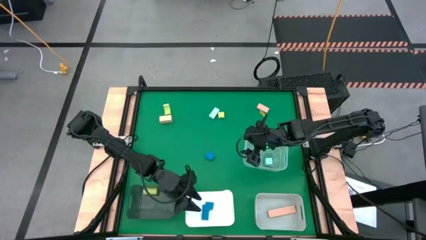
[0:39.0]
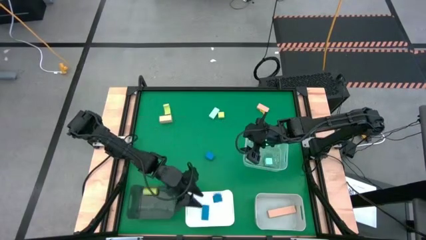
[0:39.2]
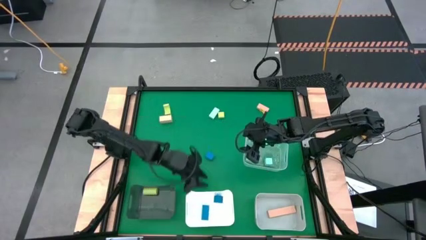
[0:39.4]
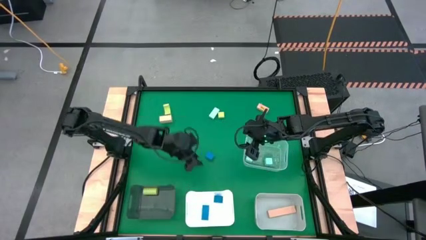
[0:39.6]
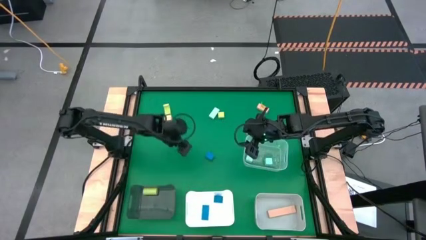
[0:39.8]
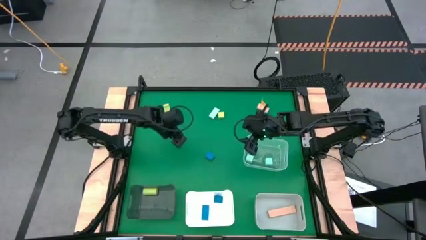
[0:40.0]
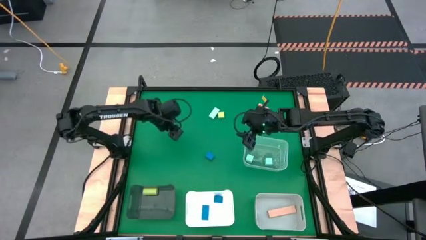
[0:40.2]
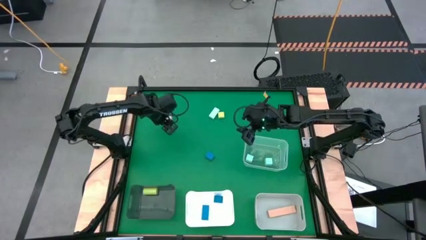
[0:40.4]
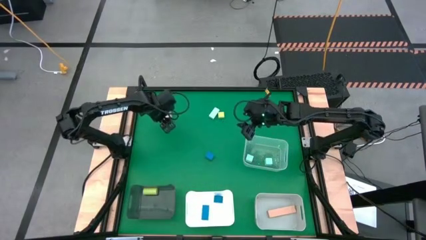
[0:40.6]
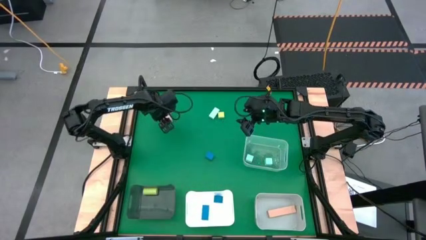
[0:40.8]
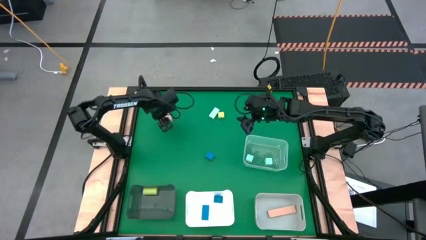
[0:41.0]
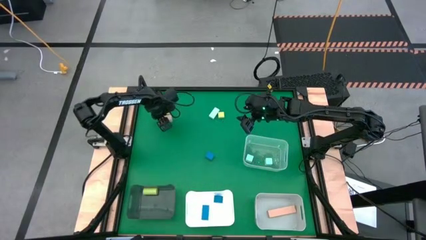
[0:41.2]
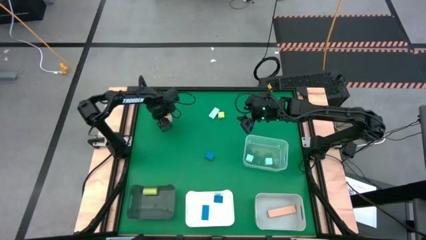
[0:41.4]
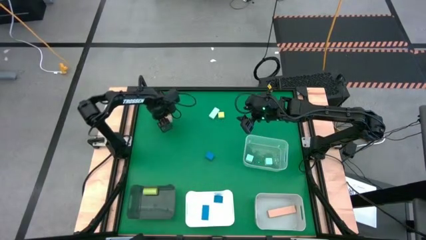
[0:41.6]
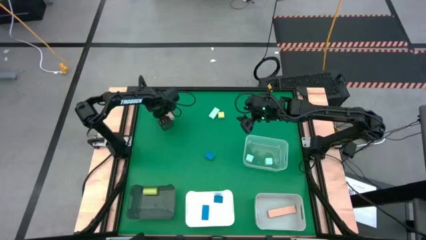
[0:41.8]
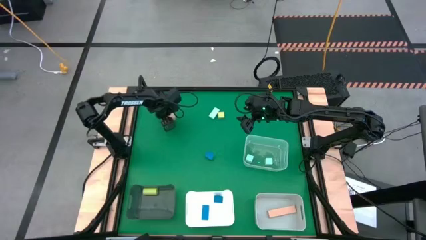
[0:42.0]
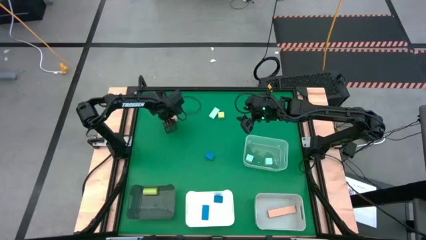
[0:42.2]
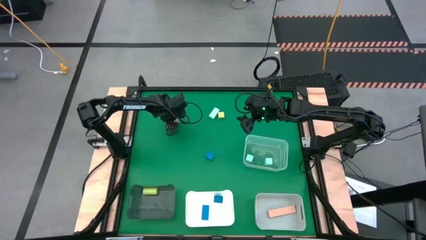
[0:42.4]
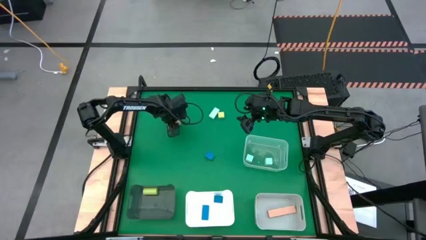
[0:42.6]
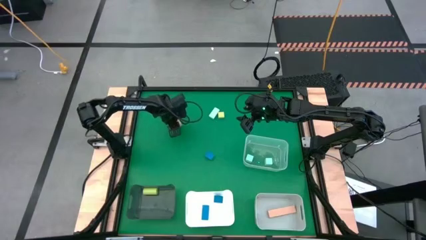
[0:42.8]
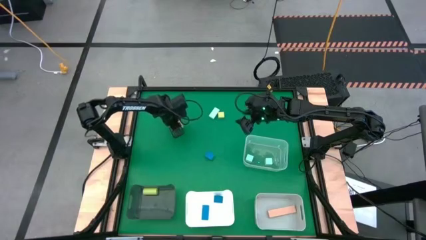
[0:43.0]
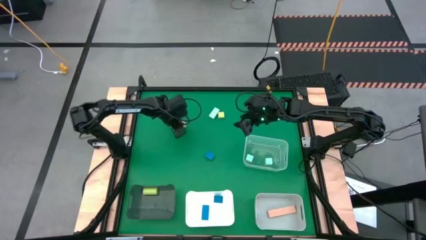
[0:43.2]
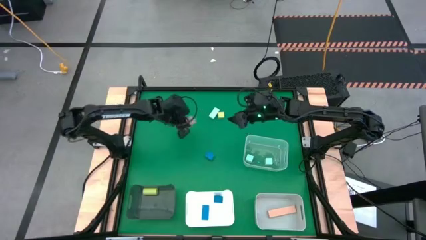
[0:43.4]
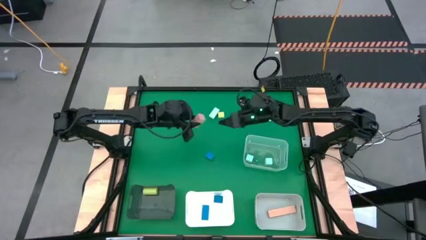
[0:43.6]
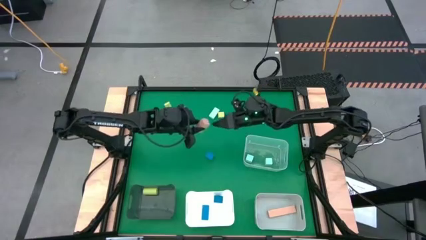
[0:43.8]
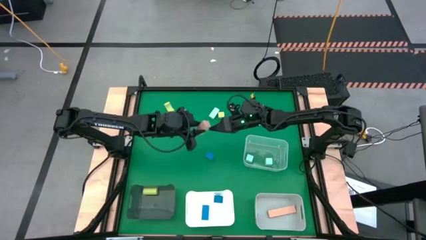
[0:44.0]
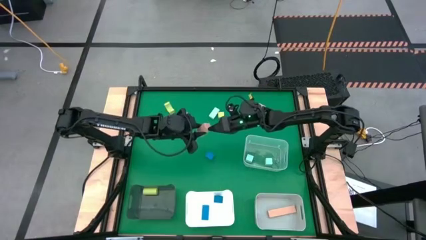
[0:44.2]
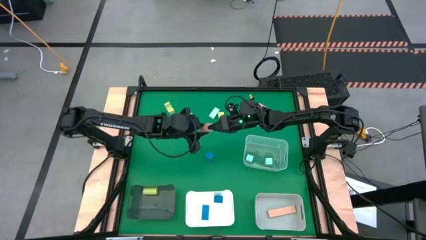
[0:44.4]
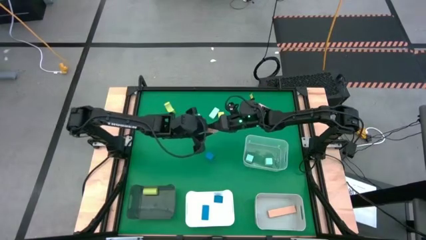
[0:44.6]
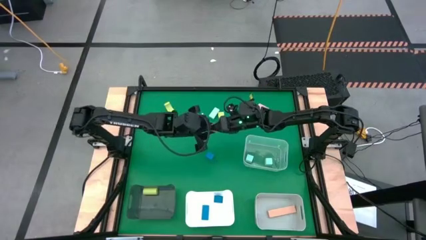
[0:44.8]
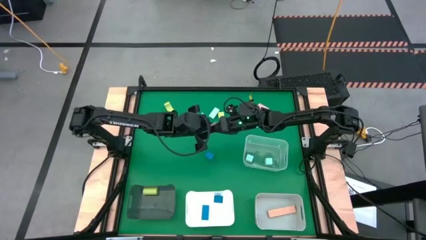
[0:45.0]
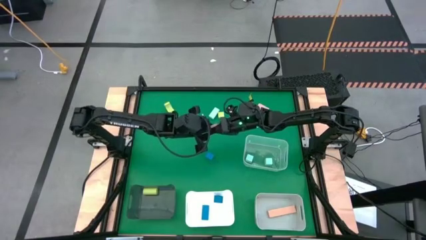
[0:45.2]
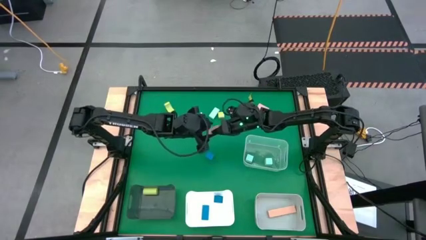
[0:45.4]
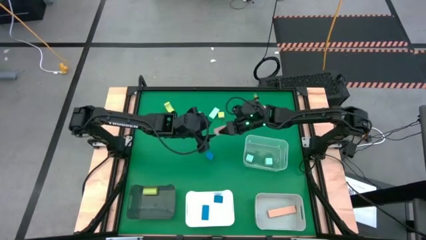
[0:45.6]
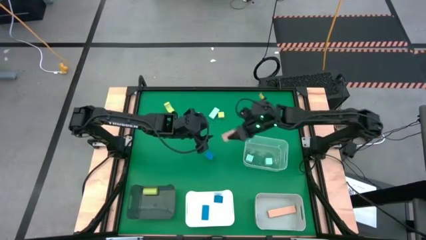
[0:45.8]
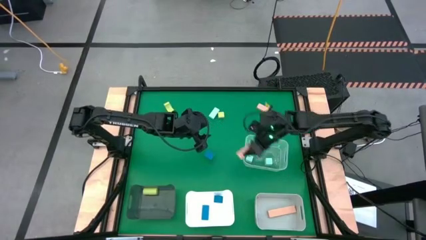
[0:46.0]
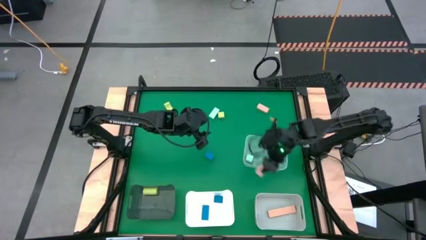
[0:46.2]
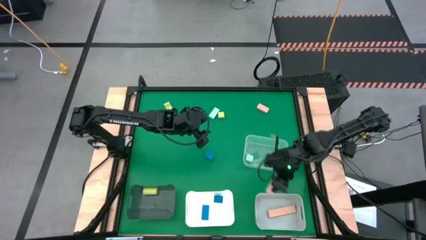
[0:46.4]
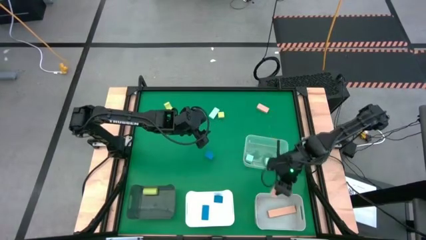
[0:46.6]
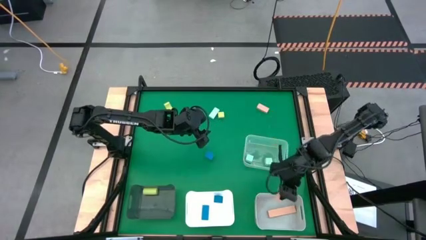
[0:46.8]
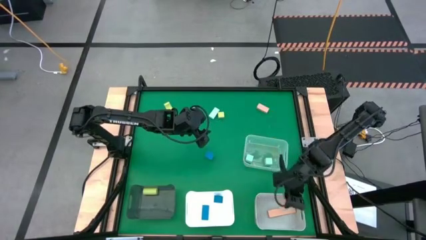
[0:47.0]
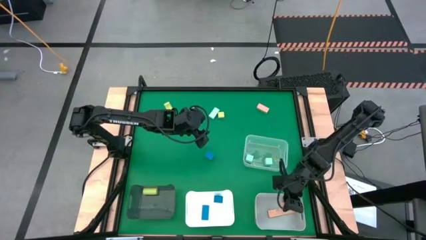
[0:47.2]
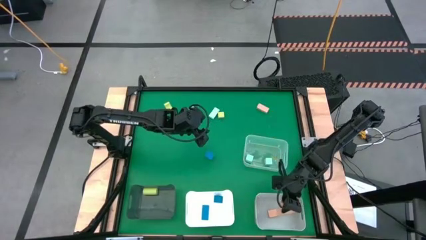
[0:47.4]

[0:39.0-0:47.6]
Task: Sort & place blocks by color
Put the left brown block into the gray bin

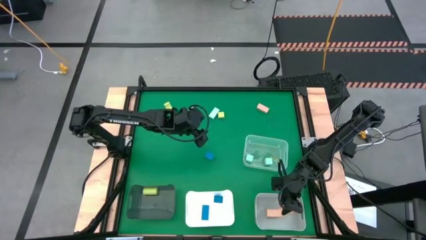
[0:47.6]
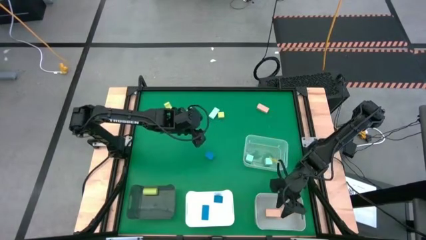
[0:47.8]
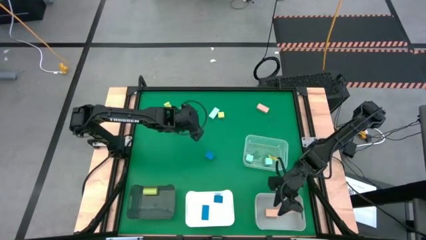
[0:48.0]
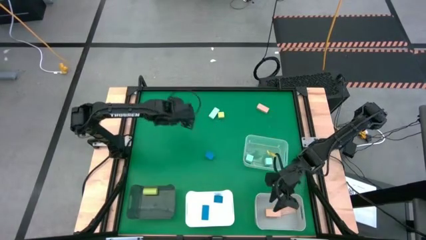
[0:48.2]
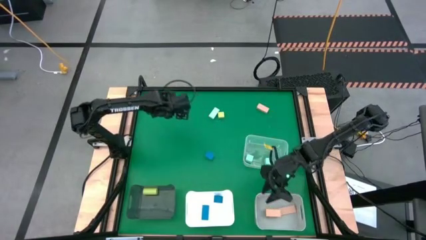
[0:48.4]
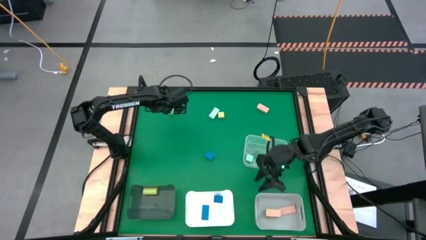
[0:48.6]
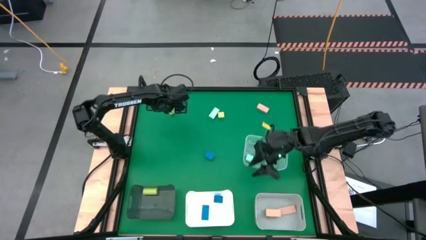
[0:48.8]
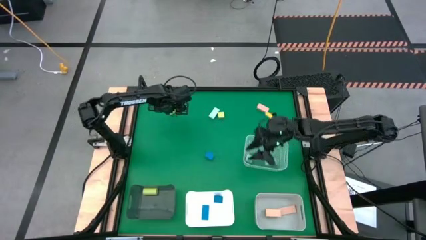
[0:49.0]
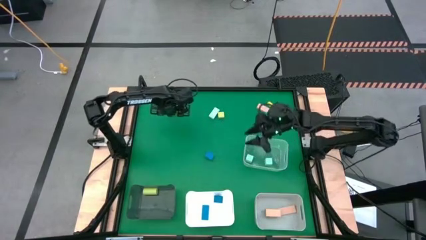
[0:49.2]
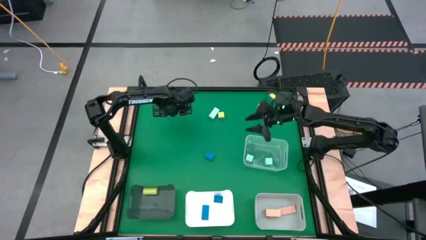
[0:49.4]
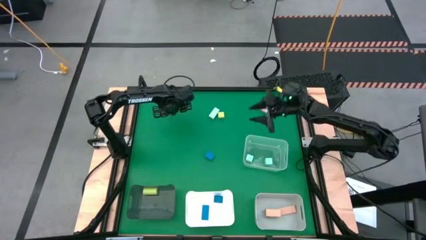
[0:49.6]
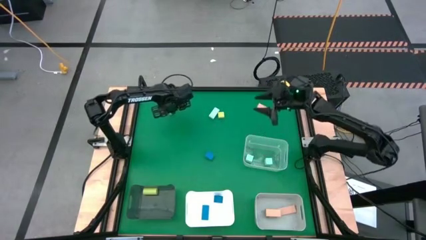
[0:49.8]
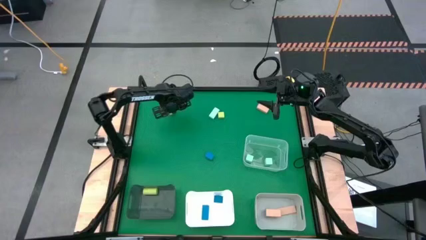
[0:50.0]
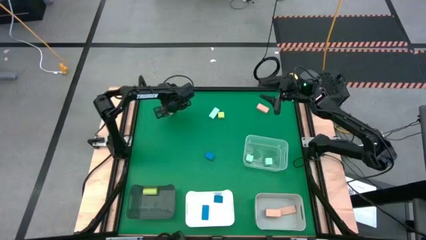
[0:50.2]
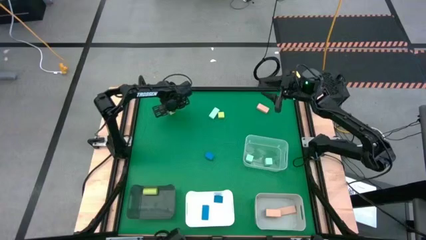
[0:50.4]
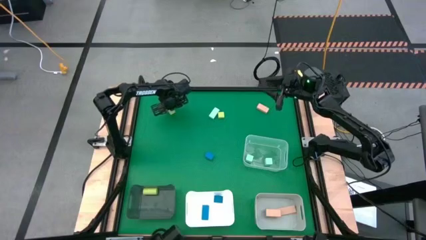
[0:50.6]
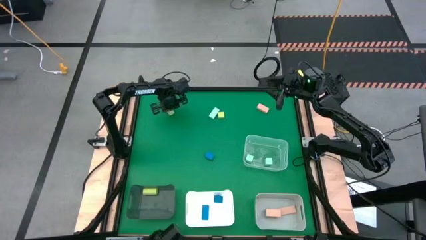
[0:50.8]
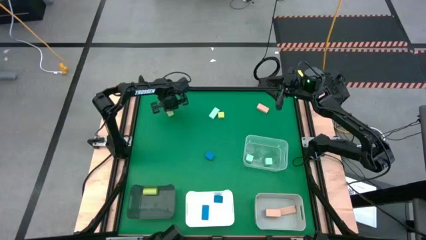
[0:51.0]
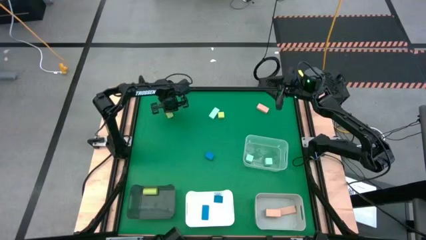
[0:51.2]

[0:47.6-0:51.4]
Put the left green block into the black bin

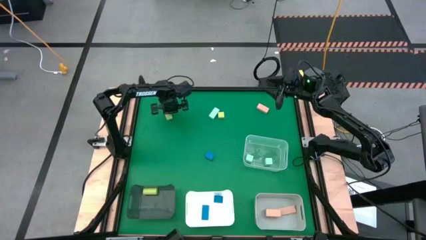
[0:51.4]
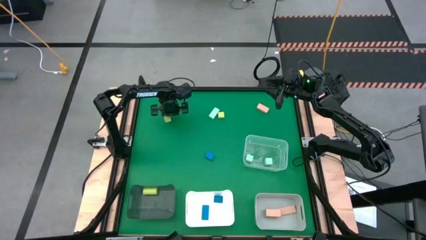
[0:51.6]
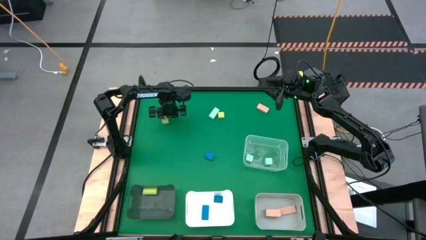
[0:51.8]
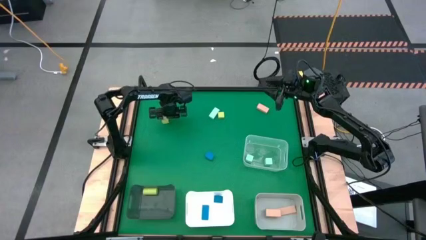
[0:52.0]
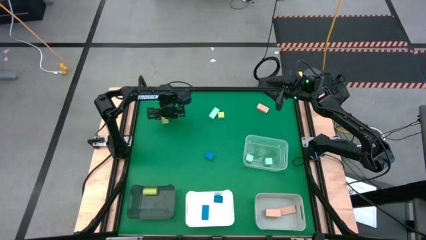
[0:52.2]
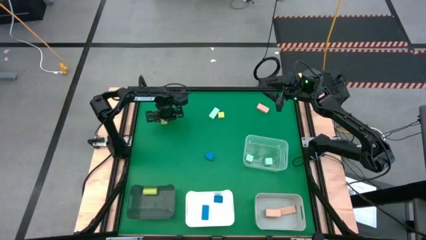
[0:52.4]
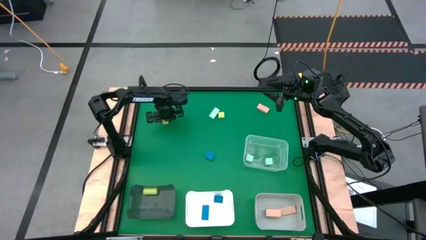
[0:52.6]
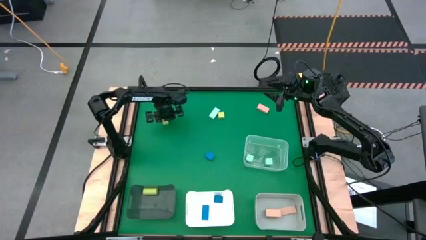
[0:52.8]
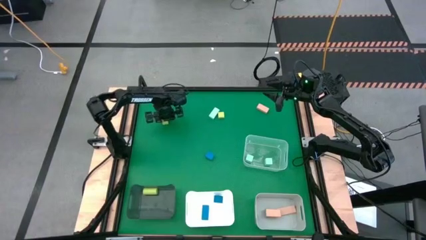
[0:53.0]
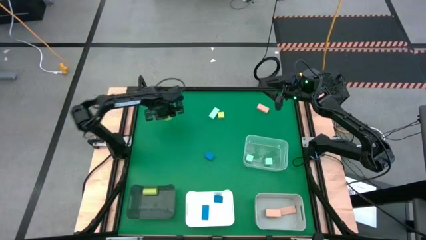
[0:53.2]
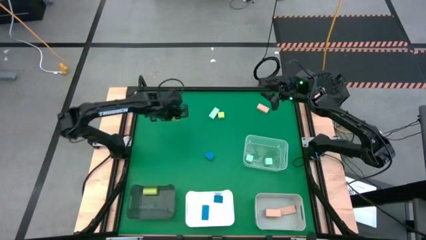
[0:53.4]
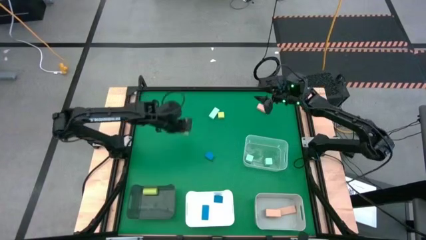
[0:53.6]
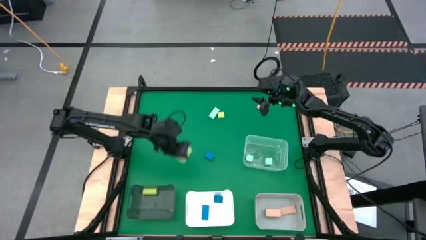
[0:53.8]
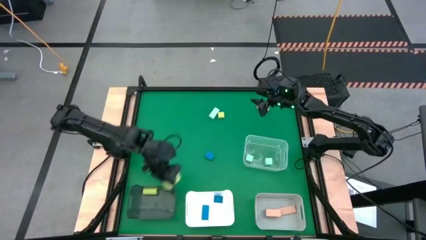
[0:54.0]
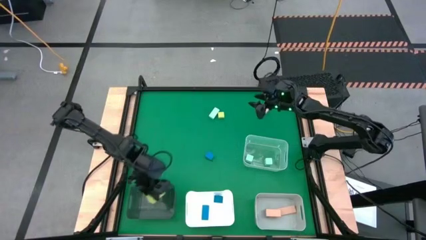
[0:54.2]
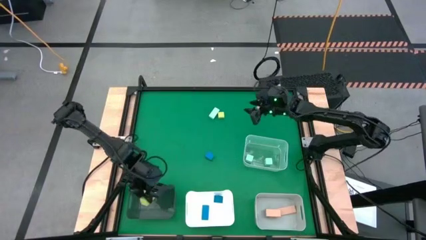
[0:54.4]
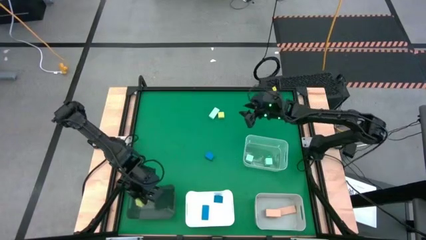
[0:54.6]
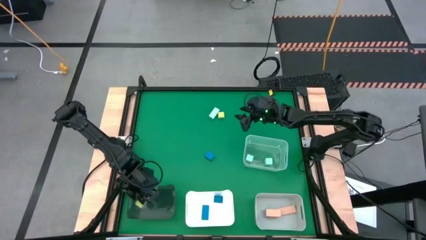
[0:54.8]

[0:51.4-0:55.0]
Put the left green block into the black bin

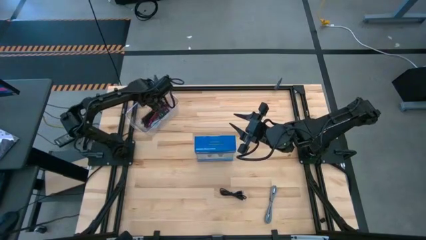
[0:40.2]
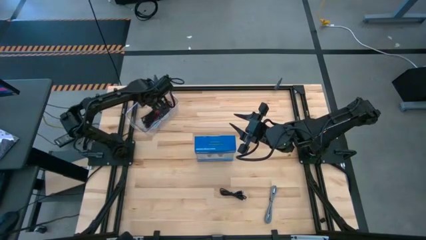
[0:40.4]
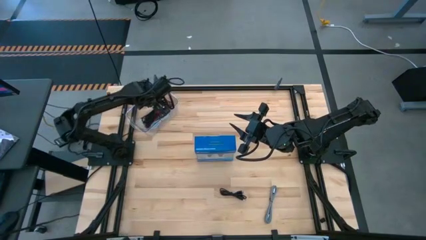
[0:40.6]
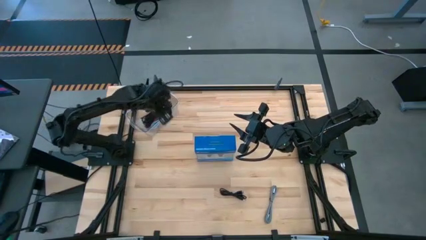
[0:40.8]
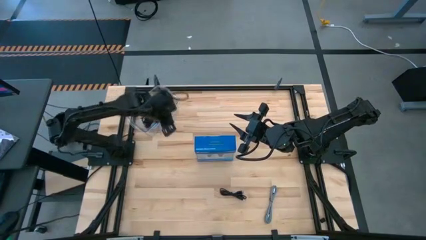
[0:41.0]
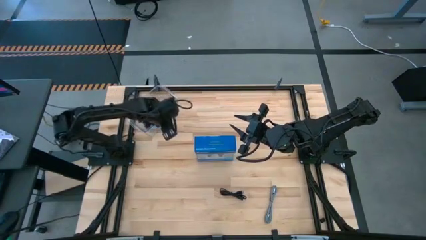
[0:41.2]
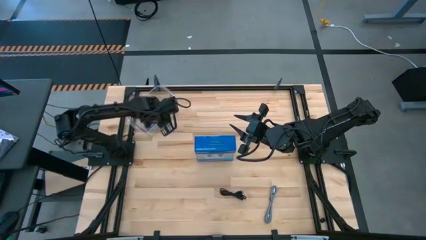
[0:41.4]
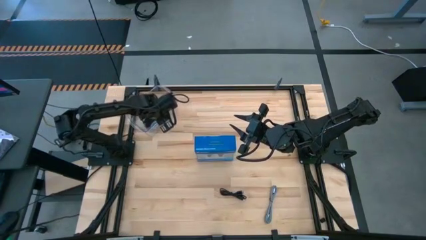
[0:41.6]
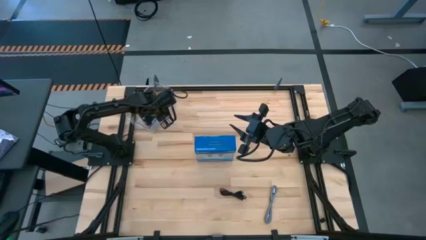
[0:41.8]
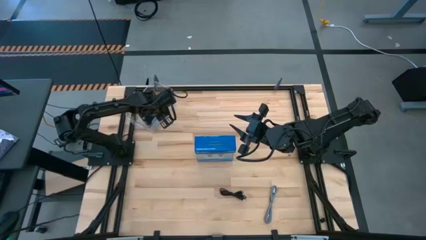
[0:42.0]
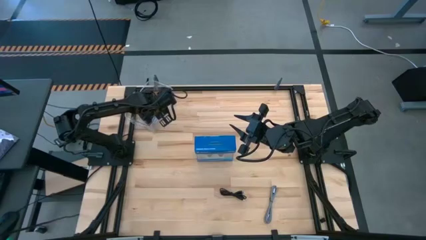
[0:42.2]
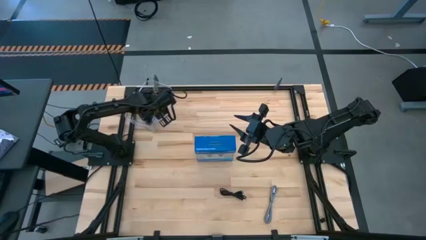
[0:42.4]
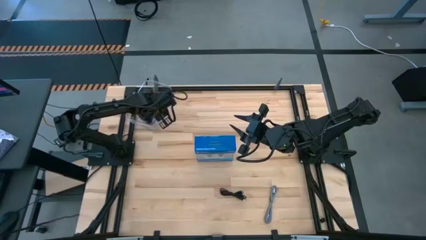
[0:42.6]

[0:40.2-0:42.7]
Task: Pick and place USB-C Cables
Adjust the transparent bin
